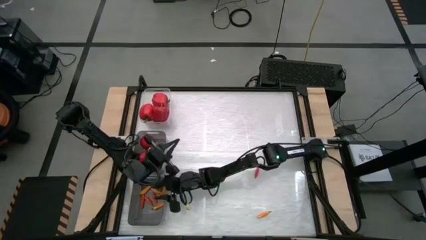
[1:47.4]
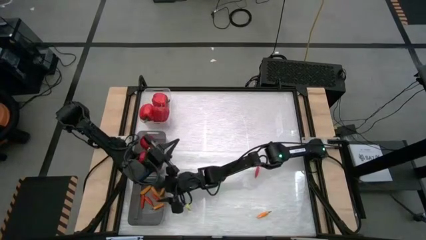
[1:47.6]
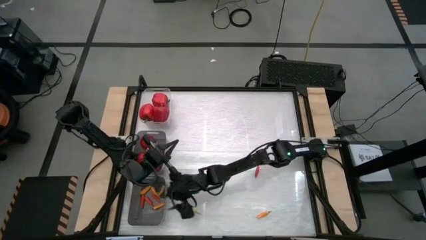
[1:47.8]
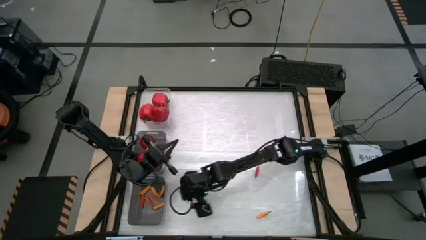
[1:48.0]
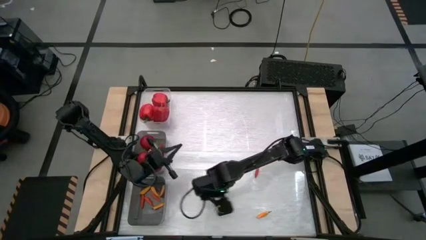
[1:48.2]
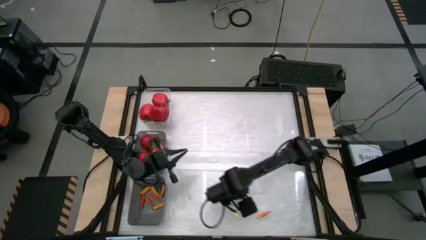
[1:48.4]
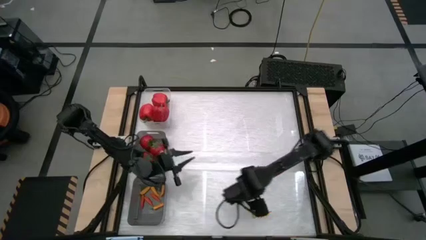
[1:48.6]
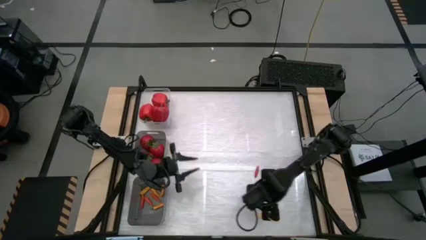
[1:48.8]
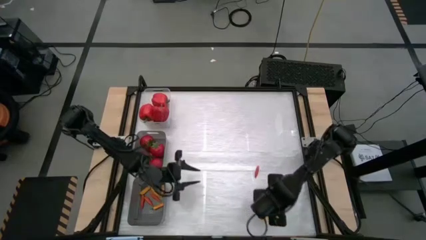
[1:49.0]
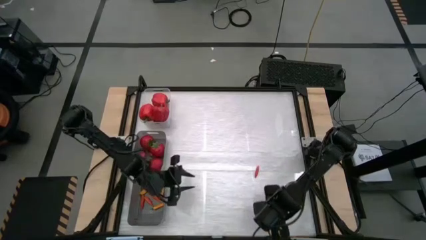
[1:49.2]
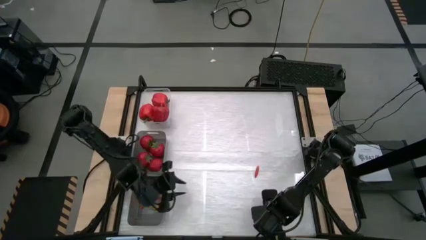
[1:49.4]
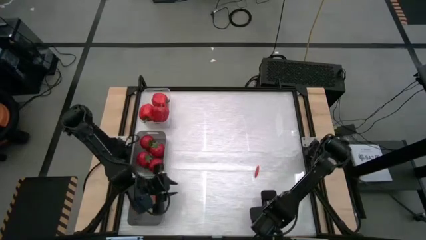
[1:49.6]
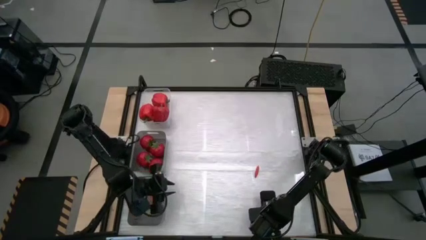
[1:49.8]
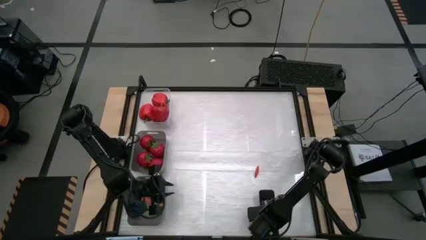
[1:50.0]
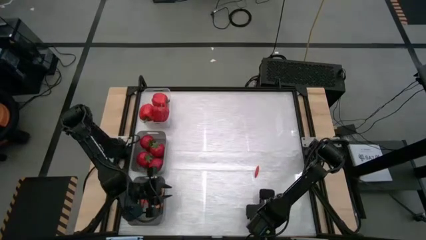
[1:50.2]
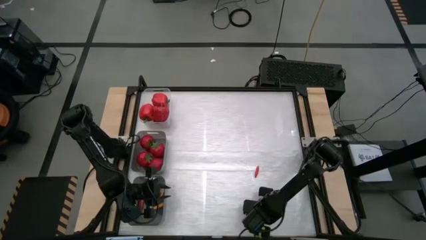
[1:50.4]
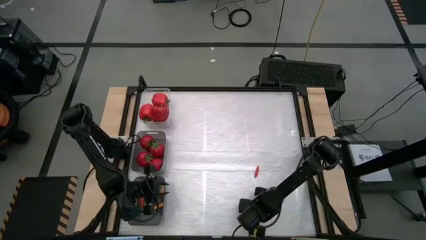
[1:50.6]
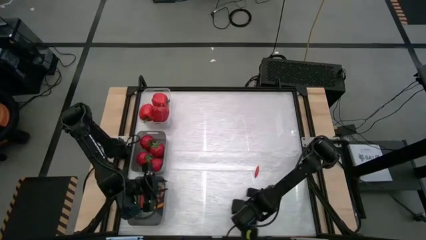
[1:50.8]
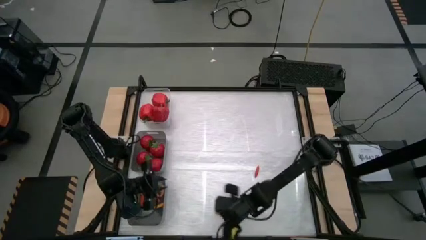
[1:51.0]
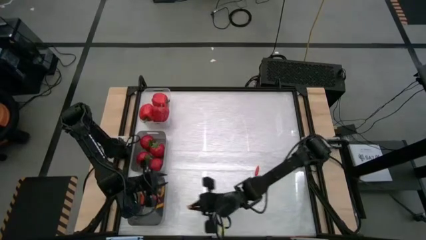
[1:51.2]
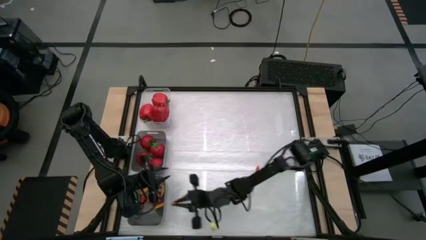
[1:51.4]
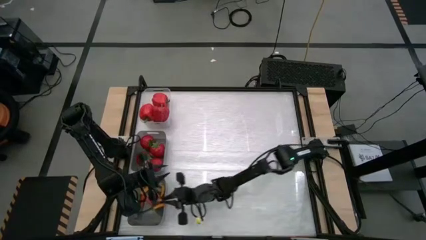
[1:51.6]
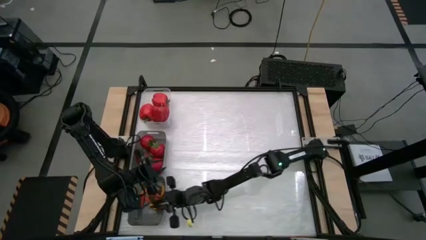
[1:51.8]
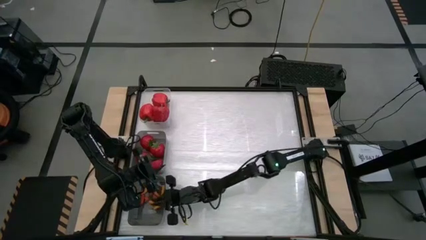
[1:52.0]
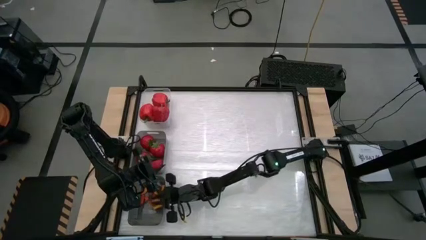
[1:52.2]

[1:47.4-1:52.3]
Task: Sort produce into baskets
Put the orange chili pepper into the bottom black transparent bin

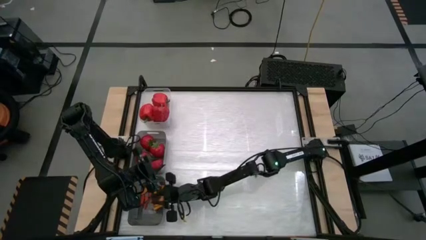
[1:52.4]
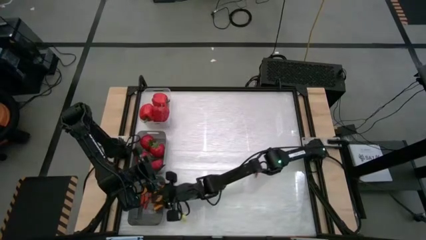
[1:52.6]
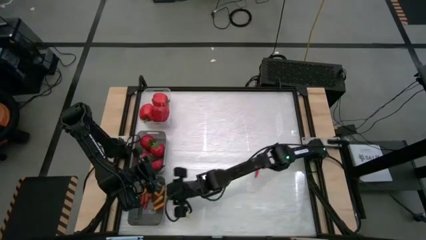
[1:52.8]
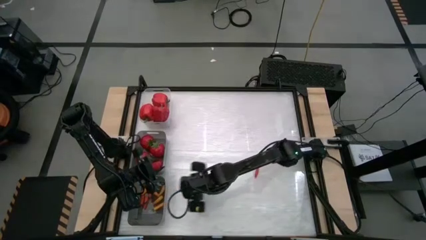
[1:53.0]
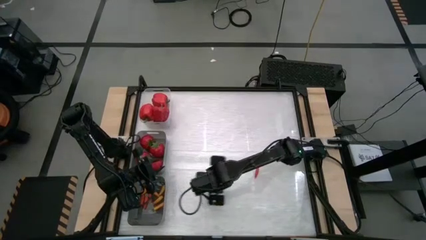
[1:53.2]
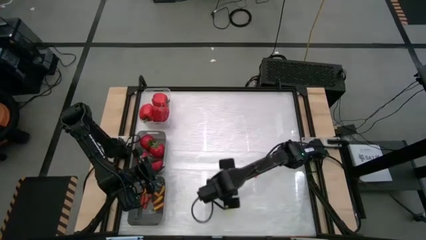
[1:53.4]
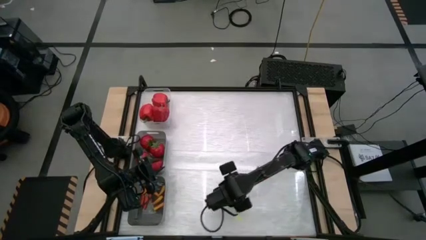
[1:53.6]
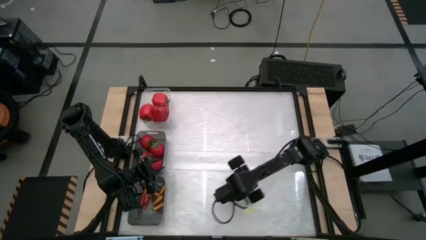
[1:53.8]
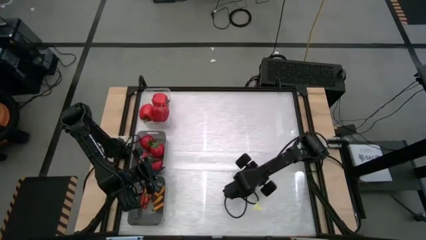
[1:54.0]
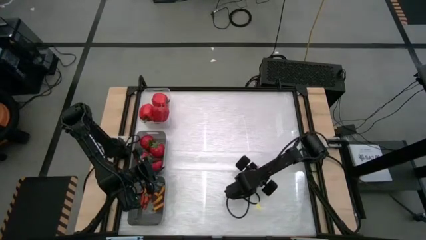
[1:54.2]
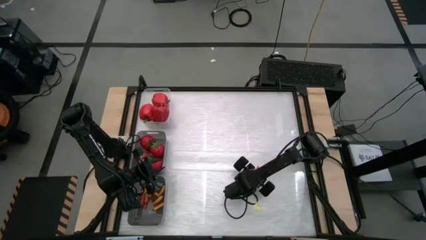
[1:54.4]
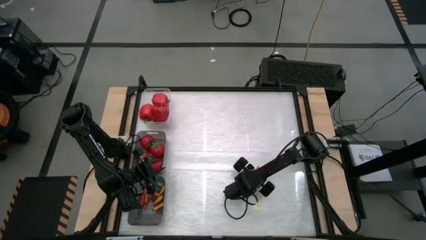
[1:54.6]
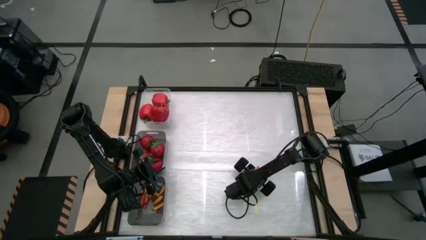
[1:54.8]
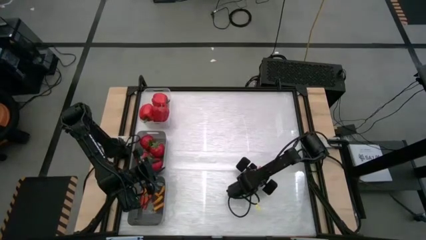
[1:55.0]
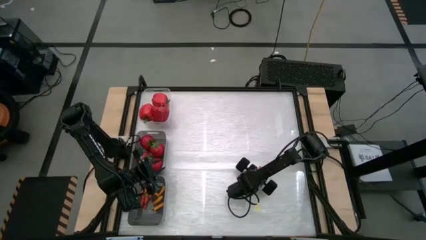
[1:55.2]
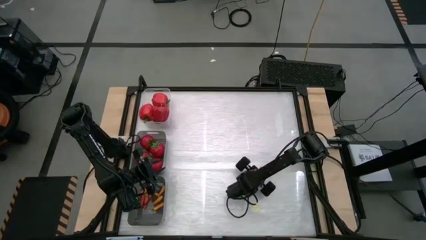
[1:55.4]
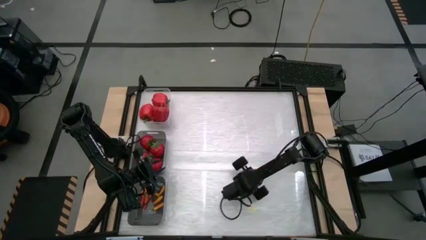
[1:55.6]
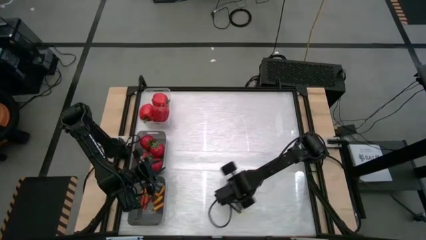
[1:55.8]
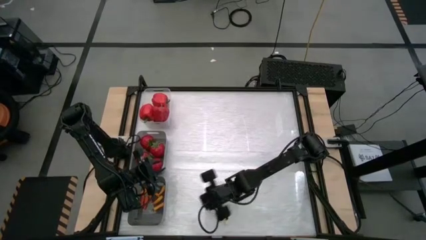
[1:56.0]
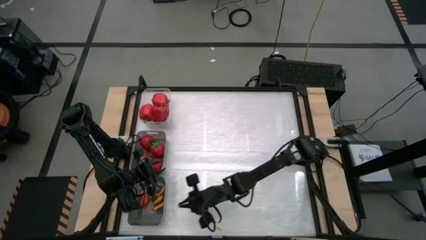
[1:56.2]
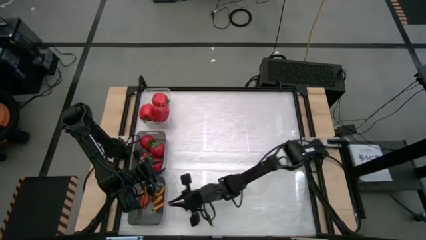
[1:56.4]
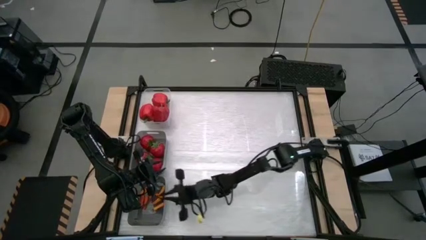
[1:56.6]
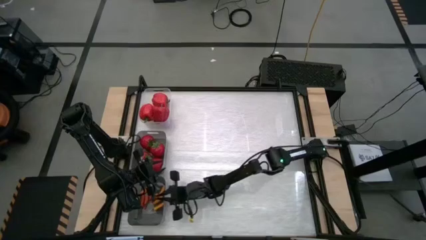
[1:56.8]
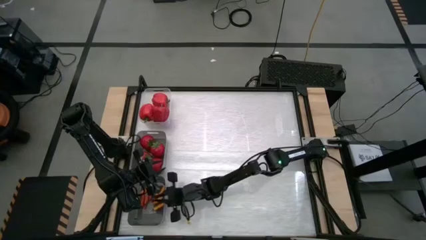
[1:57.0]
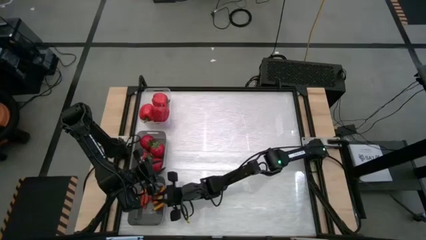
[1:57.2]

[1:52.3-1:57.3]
Put the red chili pepper into the bottom black transparent bin

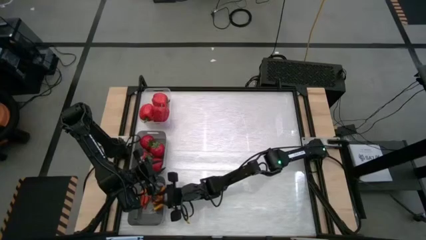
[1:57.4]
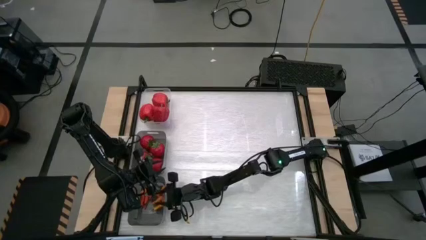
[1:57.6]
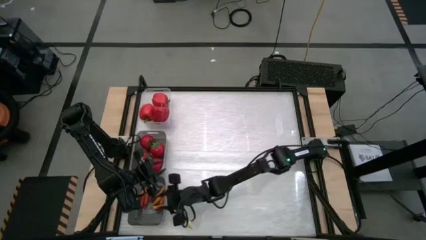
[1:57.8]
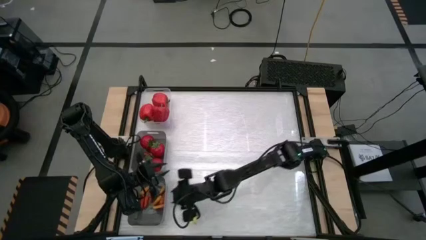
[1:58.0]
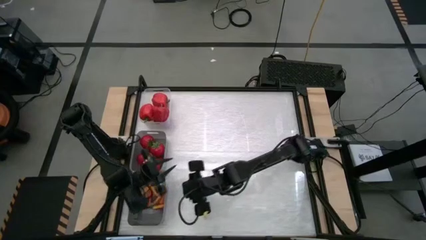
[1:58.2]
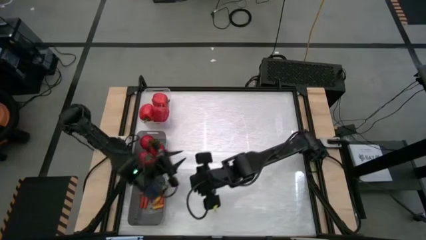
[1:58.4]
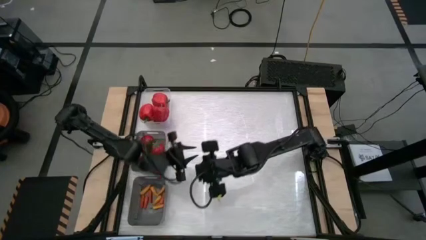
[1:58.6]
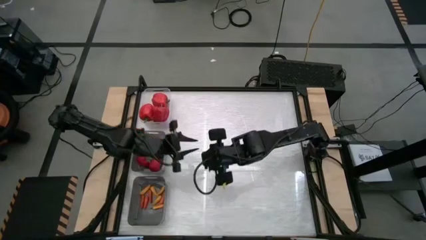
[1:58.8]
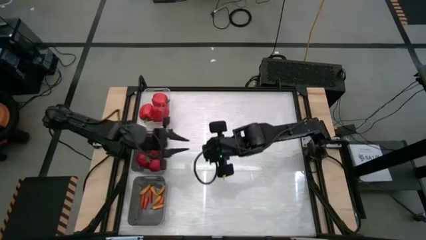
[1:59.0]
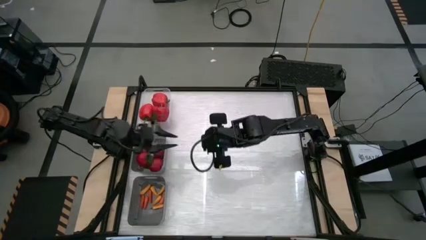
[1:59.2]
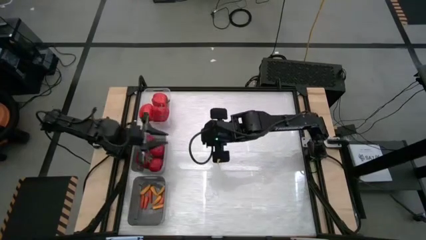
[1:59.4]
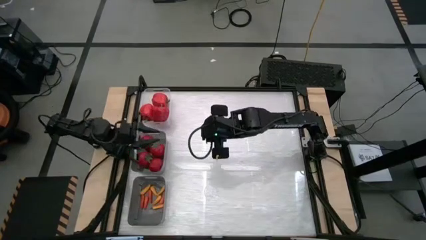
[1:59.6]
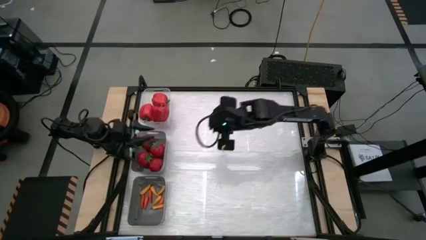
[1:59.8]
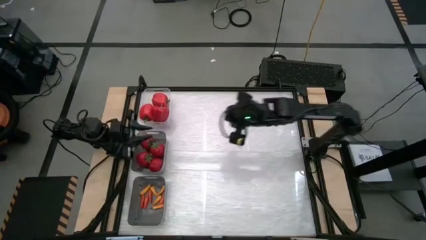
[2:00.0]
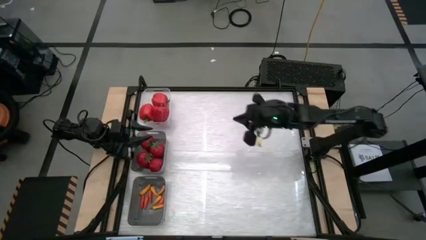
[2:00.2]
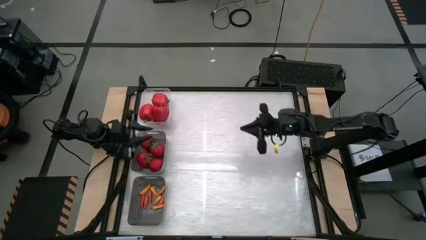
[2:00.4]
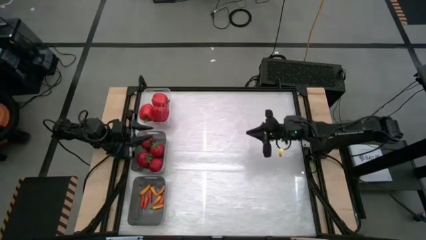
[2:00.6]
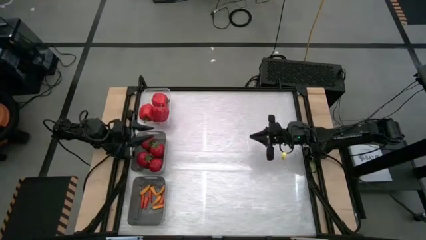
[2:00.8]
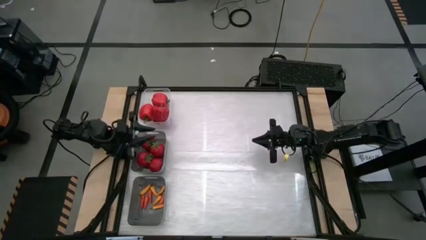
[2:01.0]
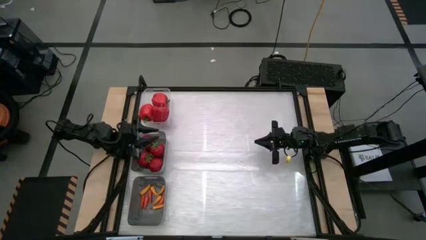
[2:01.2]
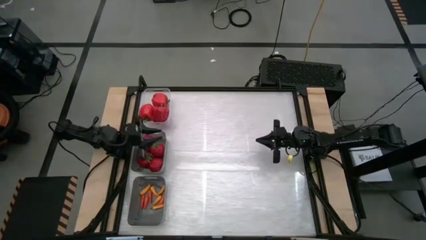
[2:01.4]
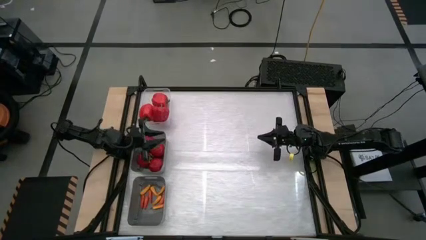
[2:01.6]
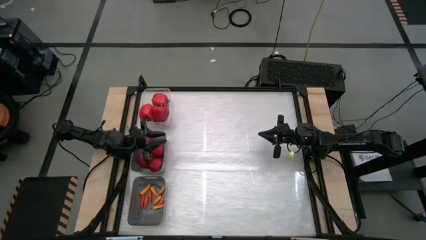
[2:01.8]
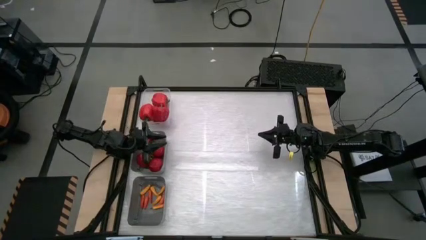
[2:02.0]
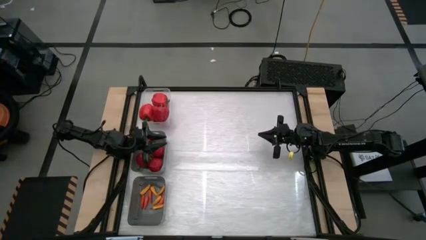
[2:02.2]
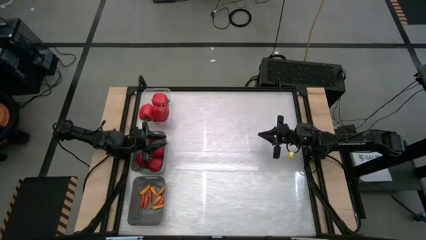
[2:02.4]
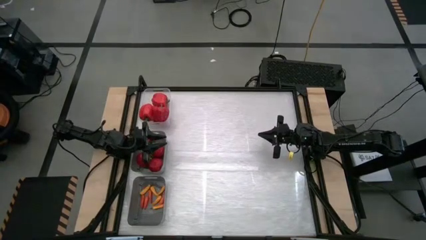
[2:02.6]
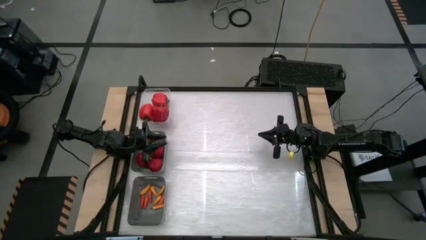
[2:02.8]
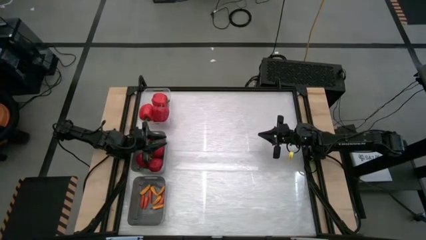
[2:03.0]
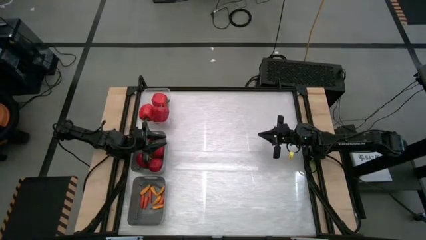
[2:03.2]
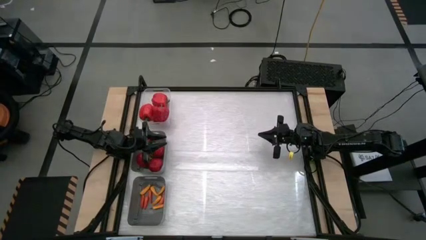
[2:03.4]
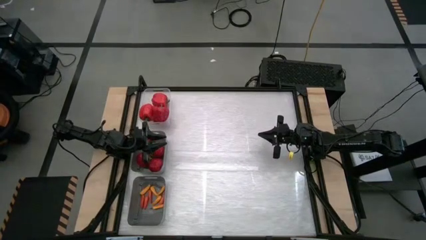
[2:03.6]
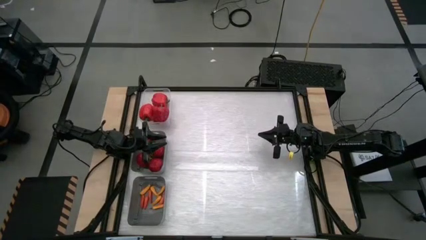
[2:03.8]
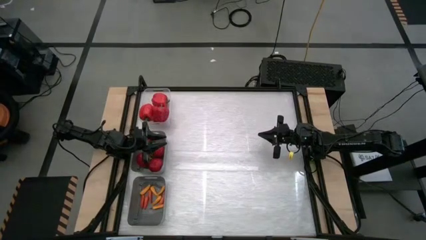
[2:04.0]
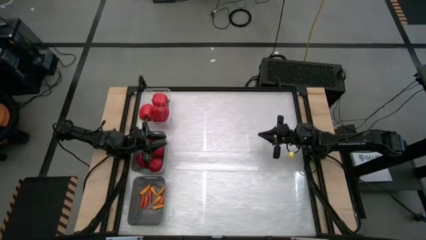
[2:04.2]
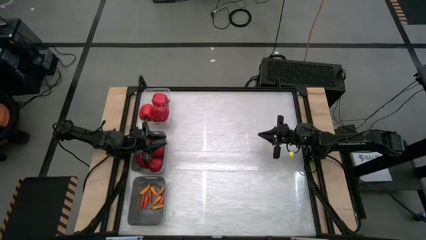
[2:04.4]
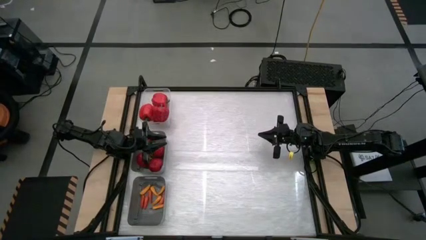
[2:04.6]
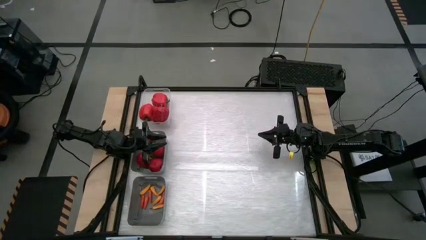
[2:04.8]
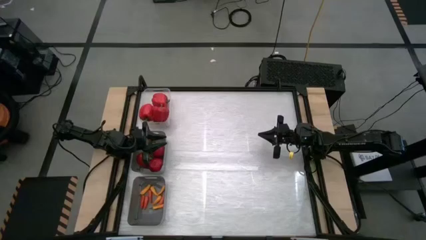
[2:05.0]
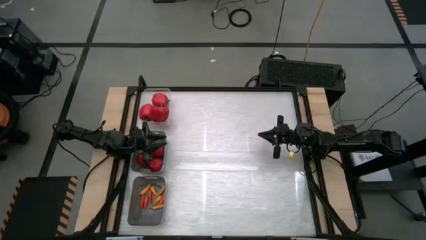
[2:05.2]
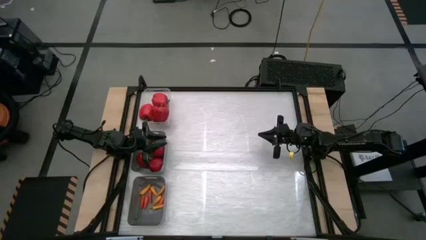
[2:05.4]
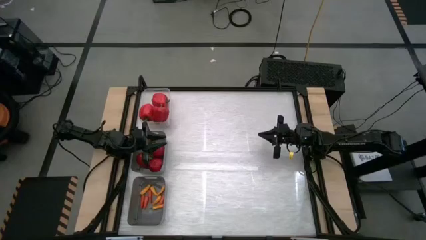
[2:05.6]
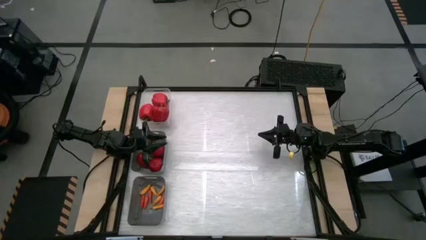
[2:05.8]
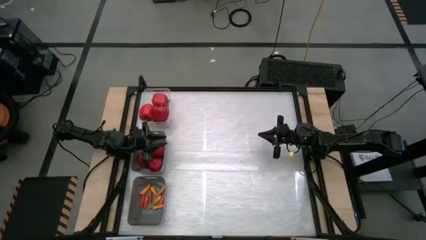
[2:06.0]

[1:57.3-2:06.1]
Return to Home Position
